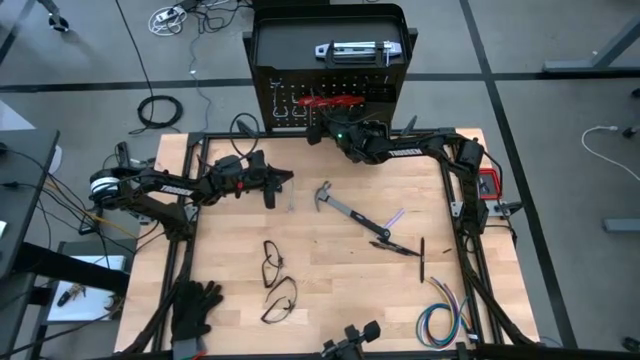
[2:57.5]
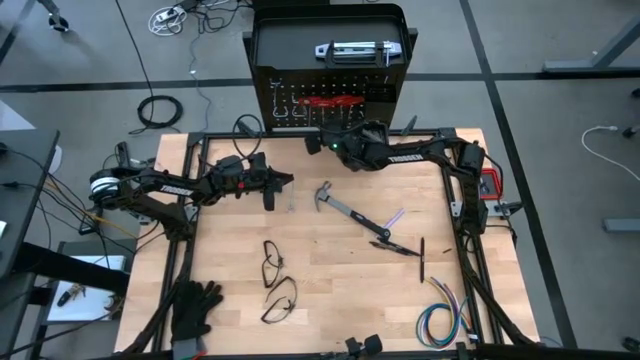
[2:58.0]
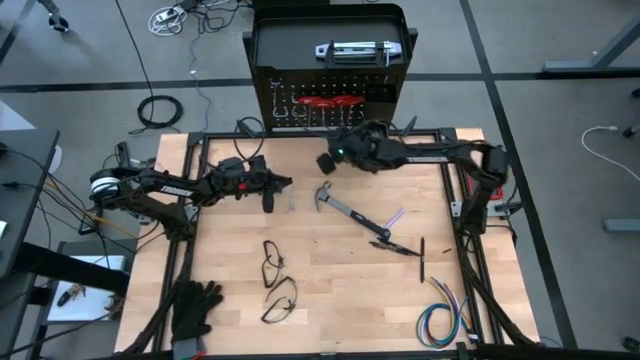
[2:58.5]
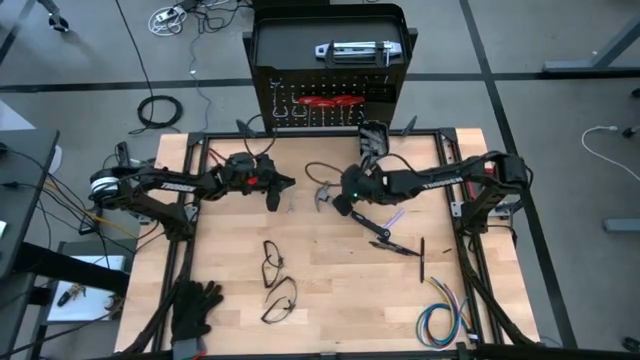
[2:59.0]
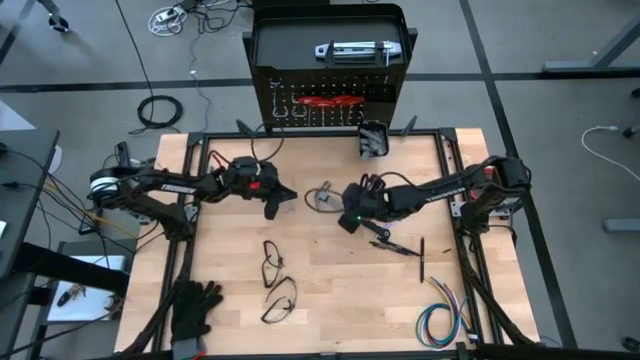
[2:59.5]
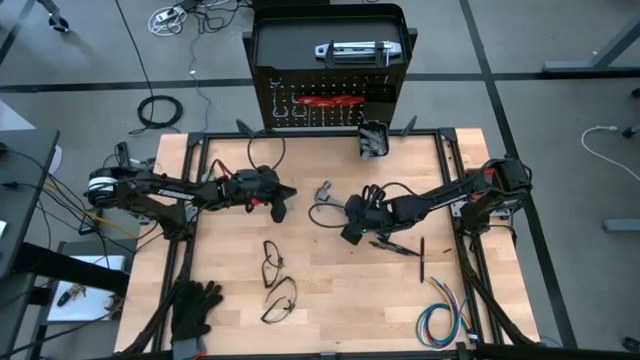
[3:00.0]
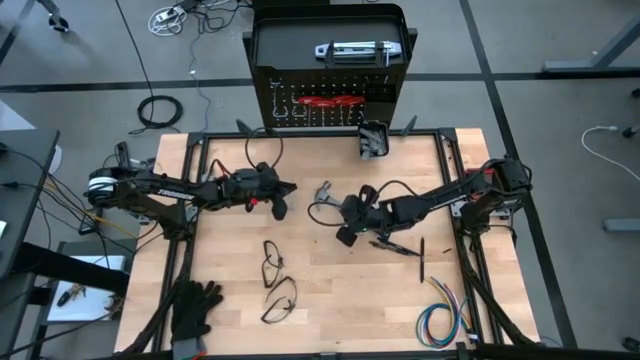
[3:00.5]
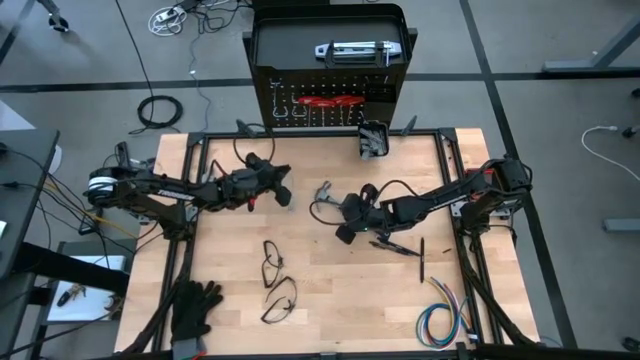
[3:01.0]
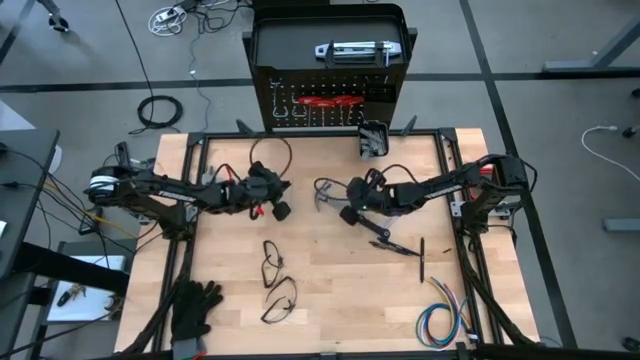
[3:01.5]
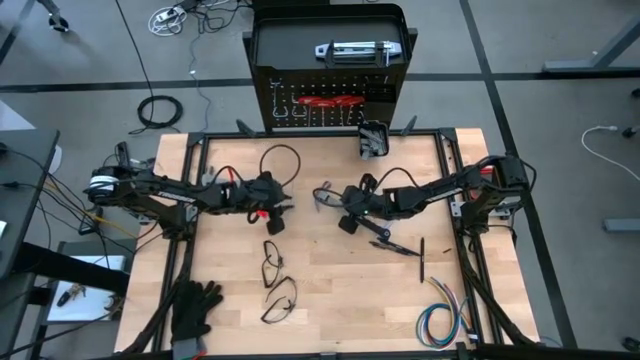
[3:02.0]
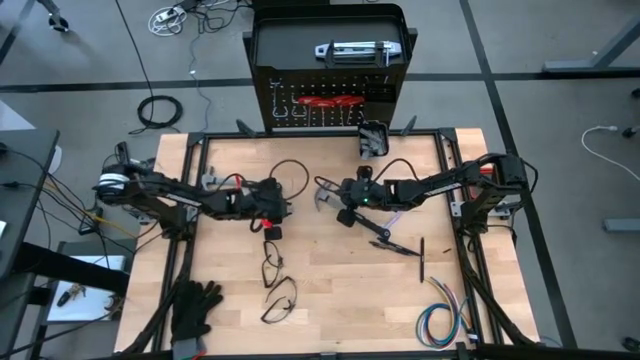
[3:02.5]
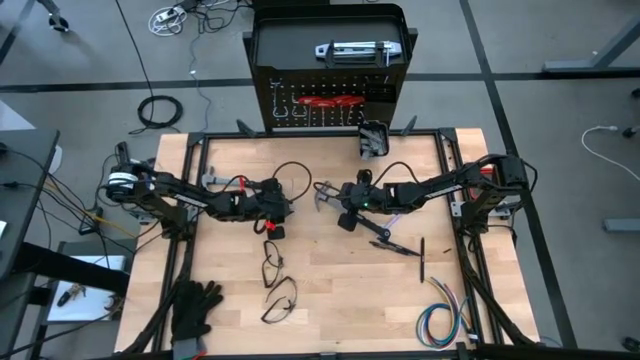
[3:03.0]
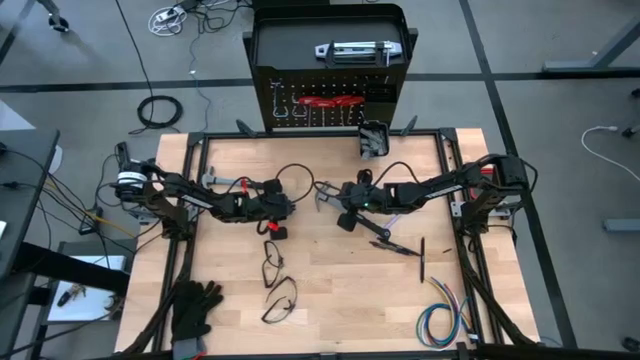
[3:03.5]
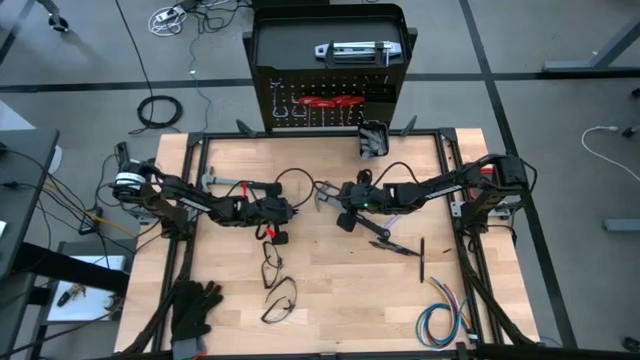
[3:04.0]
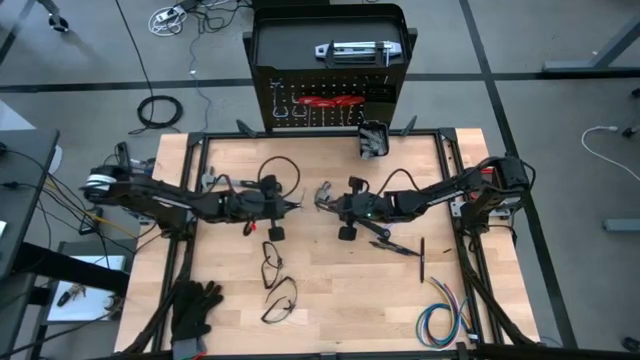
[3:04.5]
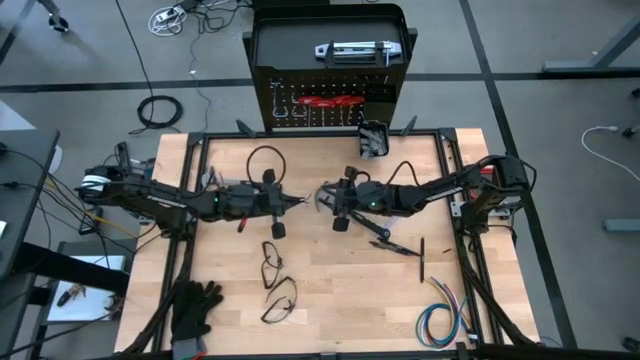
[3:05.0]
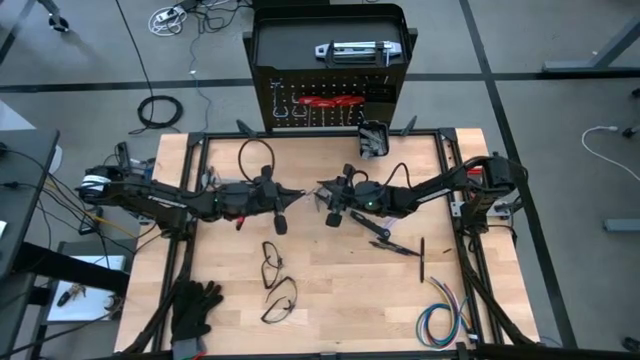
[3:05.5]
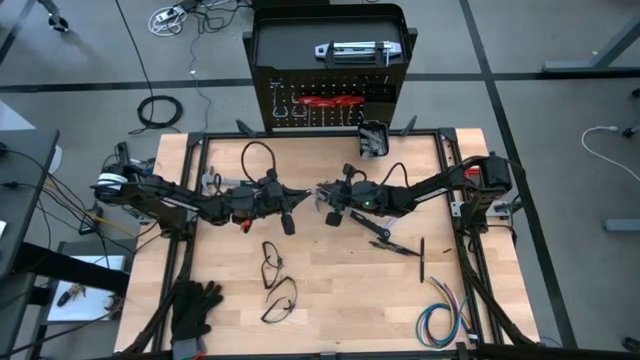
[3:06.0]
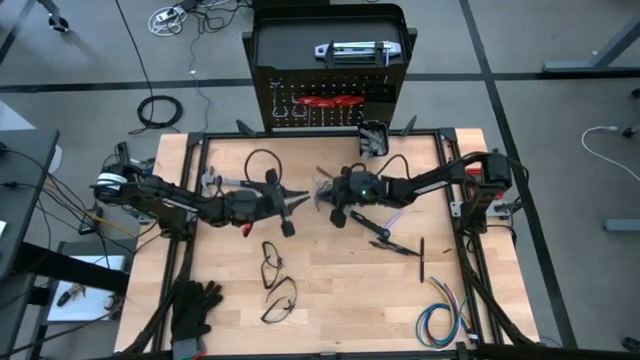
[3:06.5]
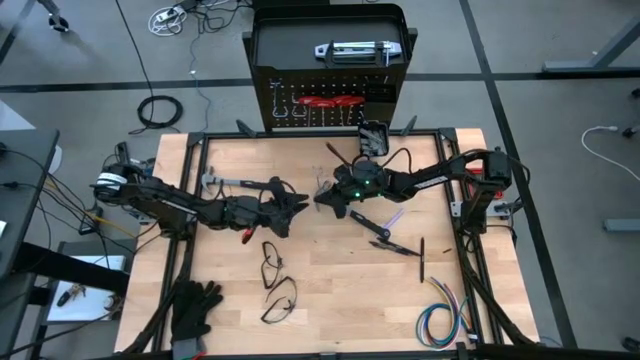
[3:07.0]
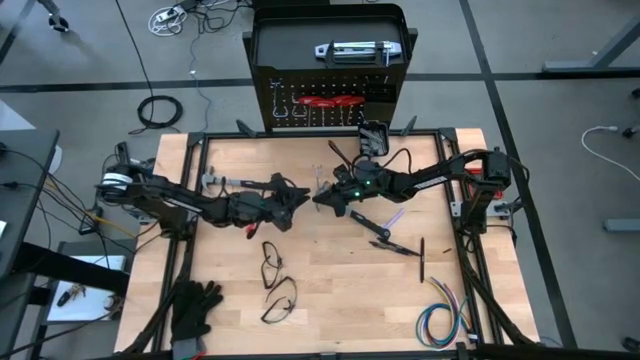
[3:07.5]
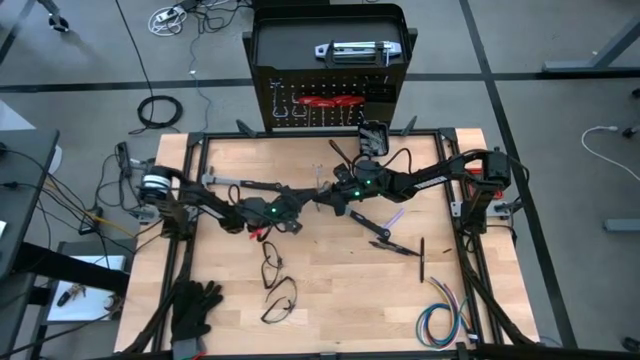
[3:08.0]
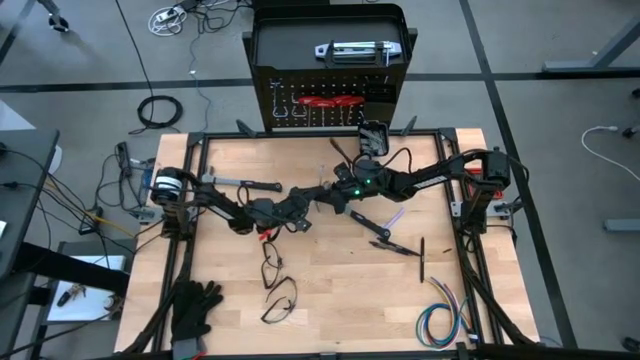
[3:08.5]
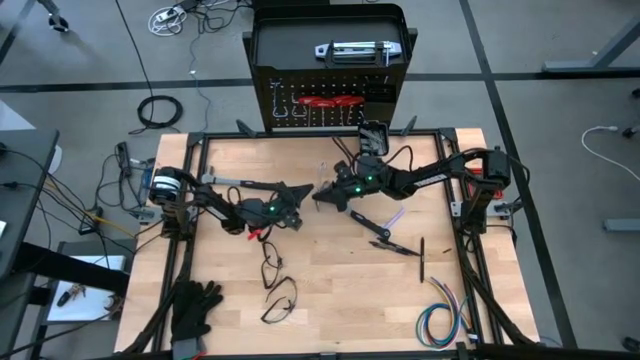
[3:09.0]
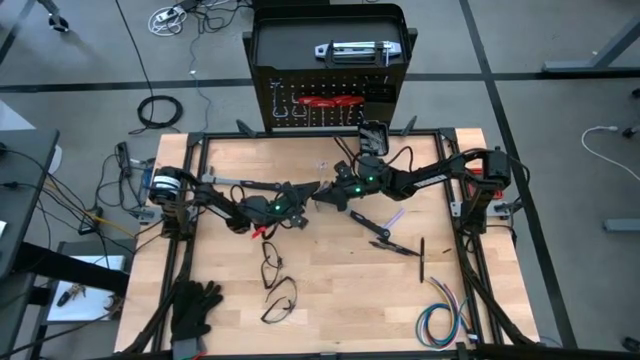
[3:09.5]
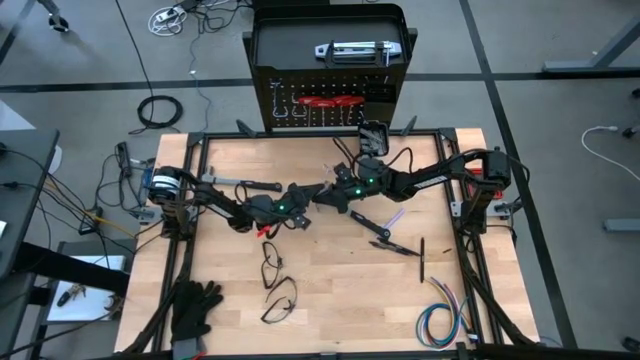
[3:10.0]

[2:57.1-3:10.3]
Task: Hang tools onto peg board
Hang the hook on the pegboard

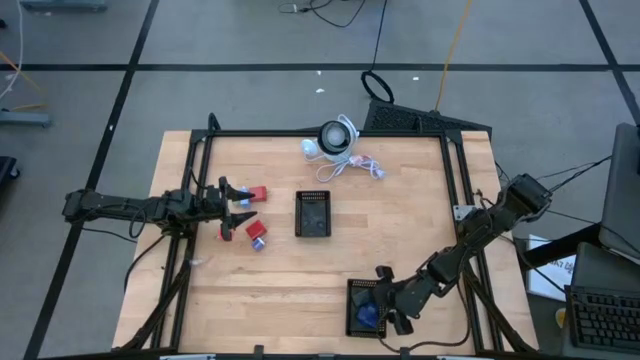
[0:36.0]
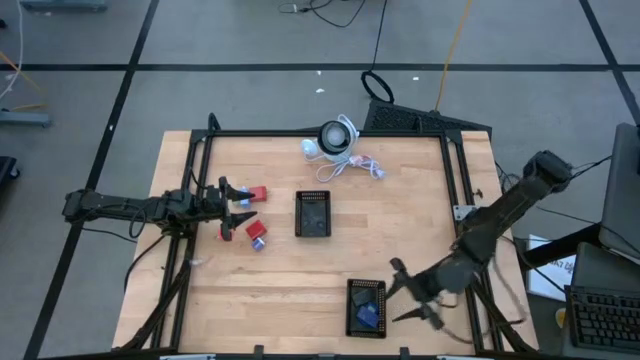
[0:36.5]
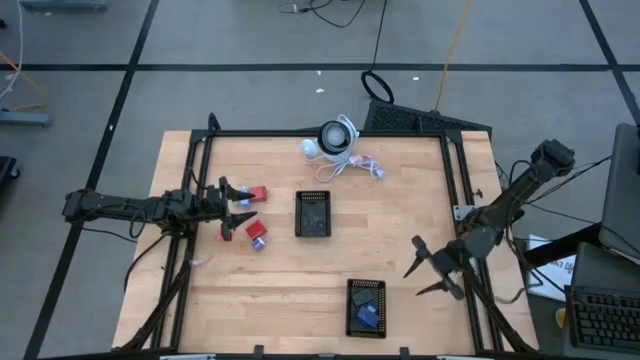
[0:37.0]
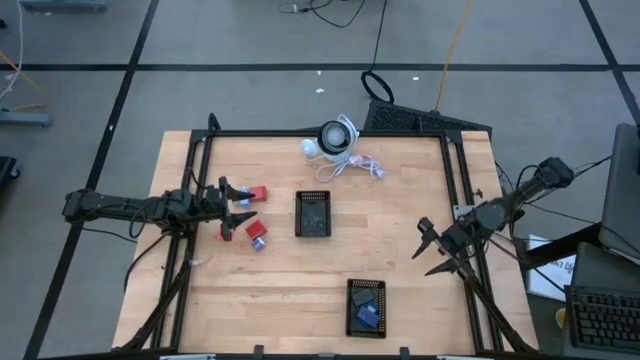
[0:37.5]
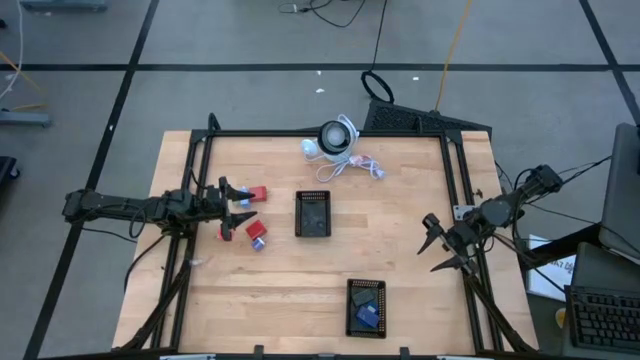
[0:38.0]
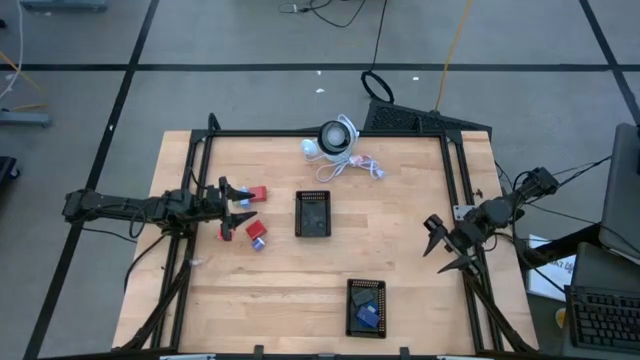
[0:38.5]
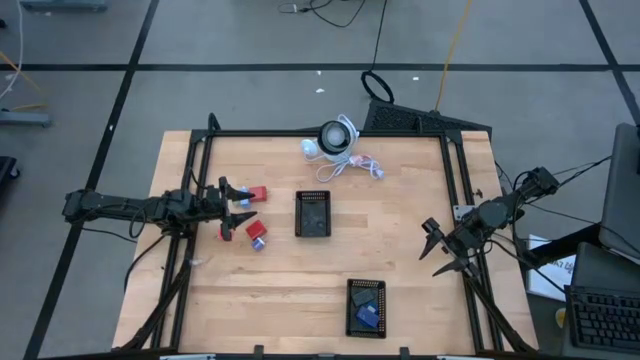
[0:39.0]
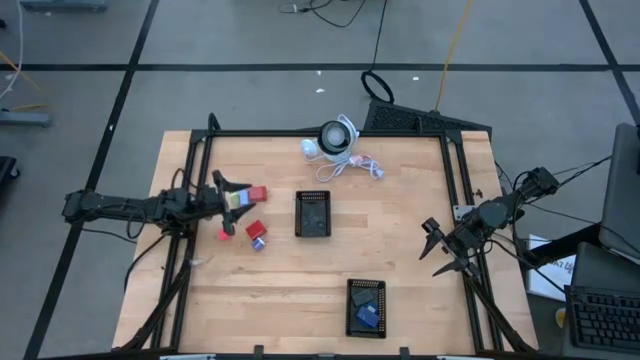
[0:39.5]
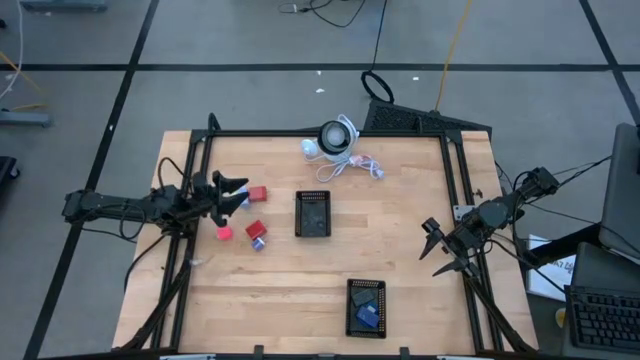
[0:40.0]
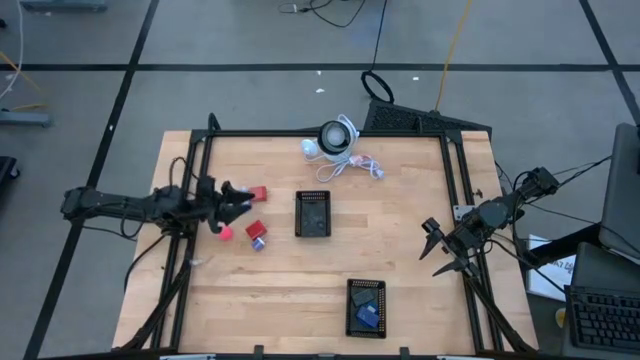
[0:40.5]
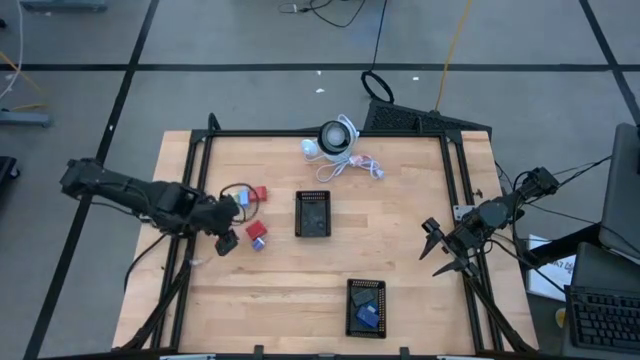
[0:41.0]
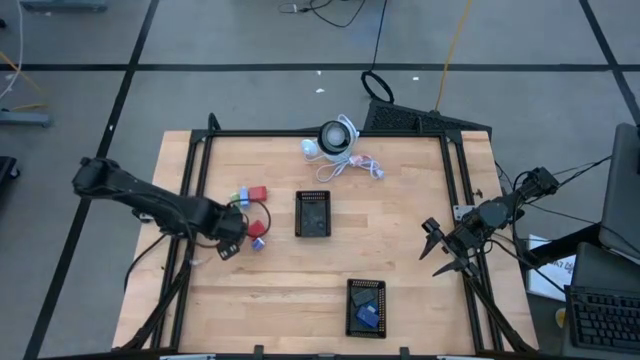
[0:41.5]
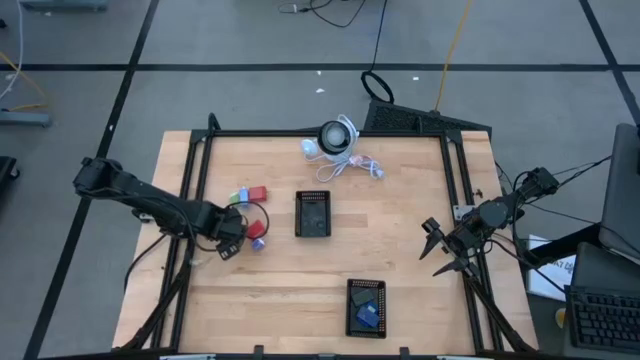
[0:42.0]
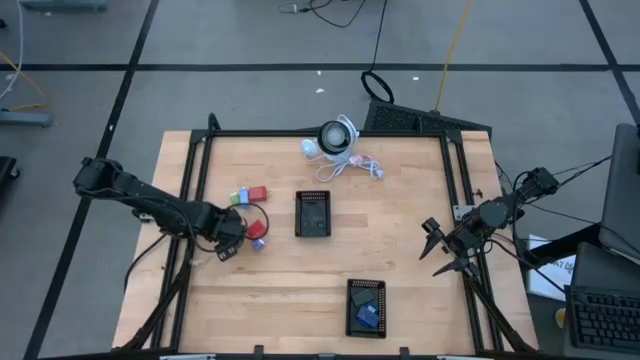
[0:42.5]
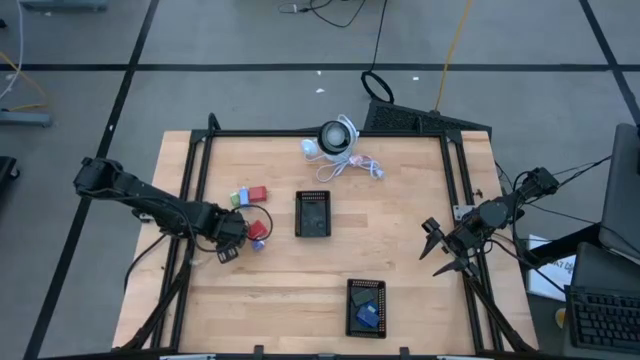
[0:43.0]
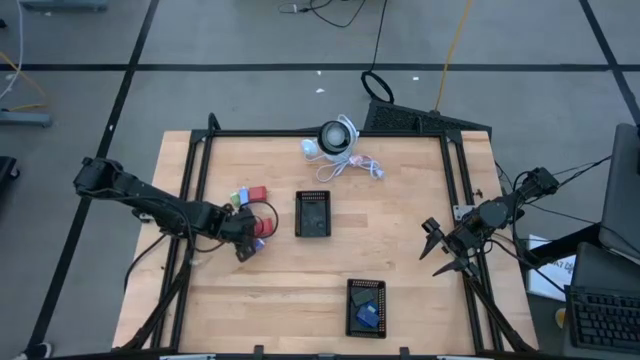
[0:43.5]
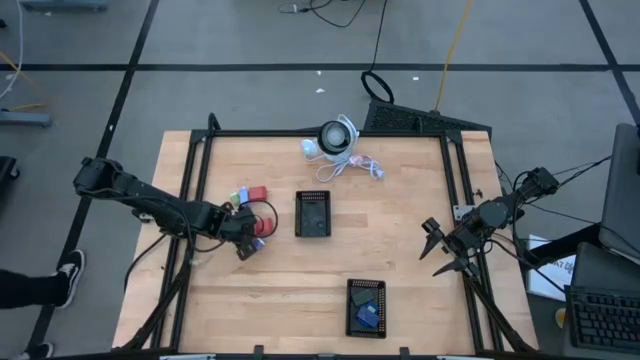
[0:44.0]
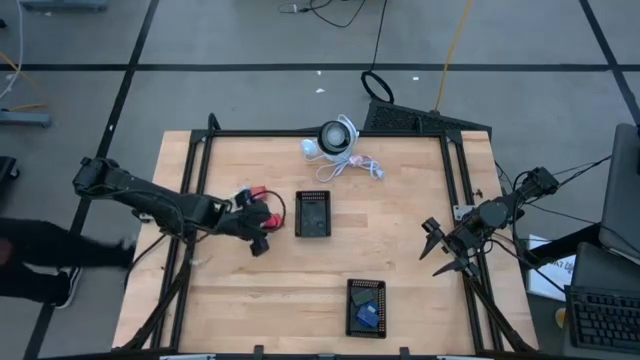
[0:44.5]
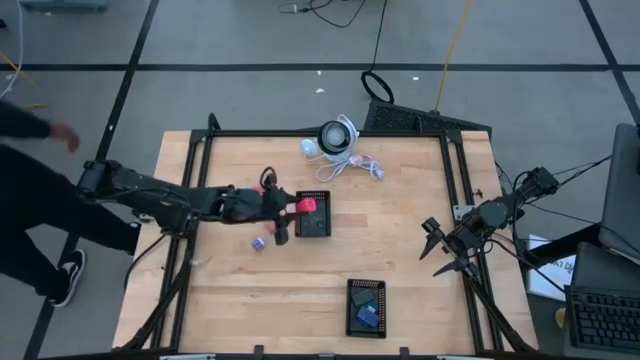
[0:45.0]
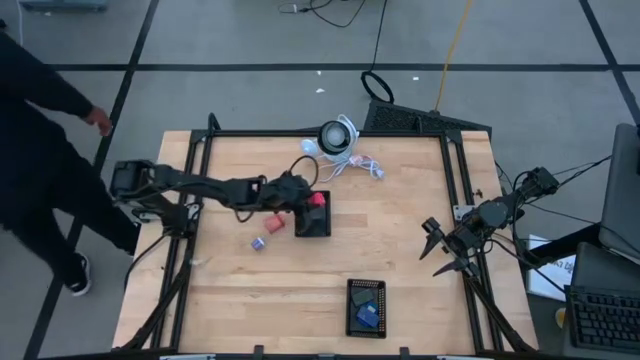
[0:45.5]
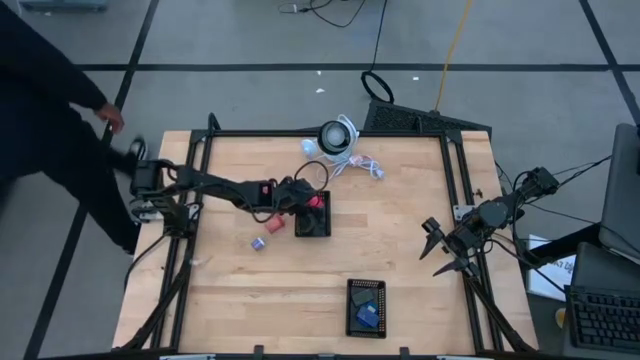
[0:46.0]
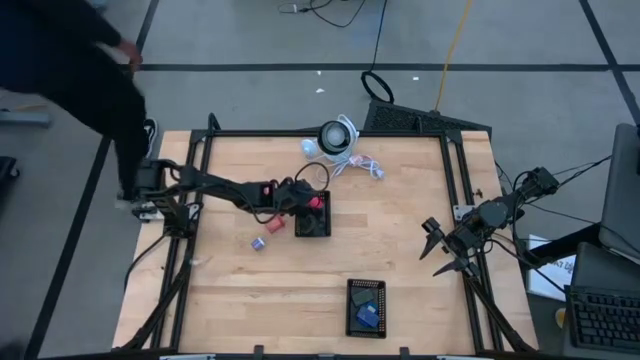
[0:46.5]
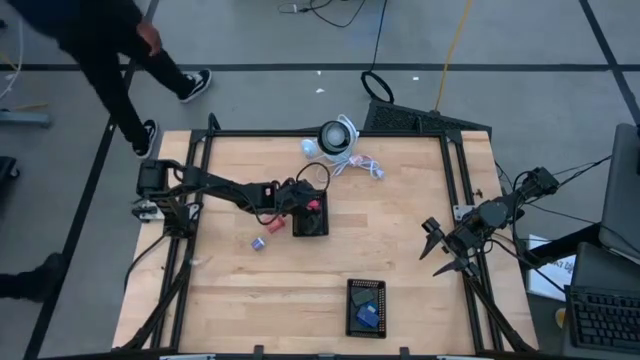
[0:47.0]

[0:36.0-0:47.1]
Task: Pick & Place Office items
Put the pink charger into the top black basket
